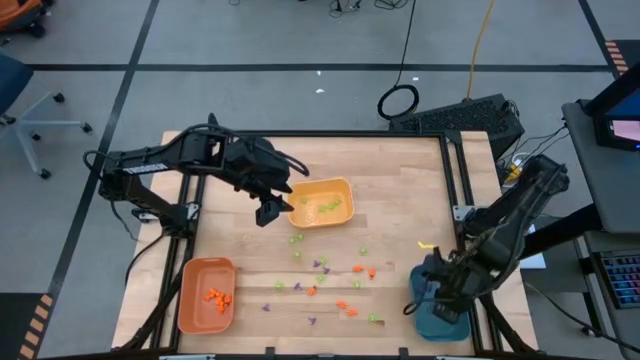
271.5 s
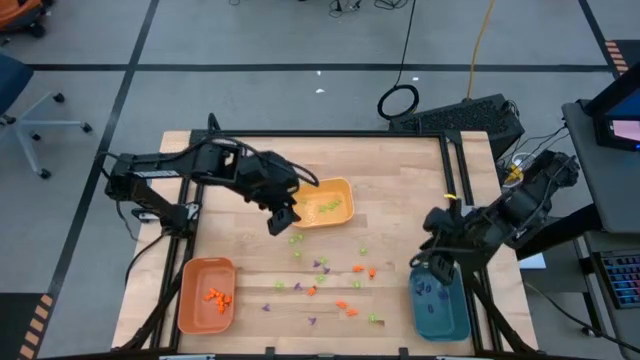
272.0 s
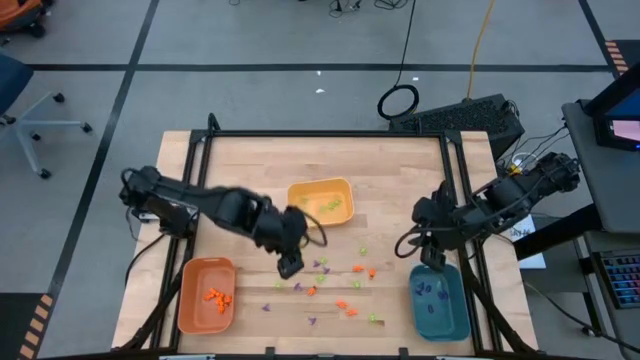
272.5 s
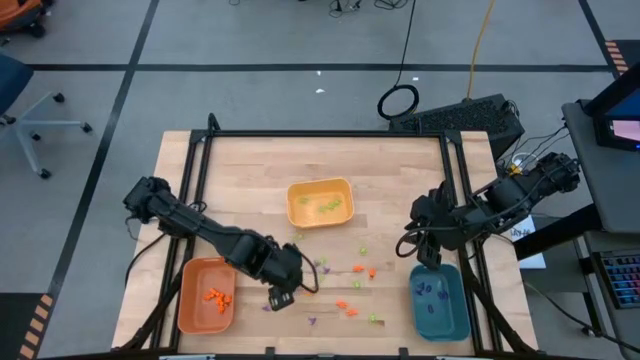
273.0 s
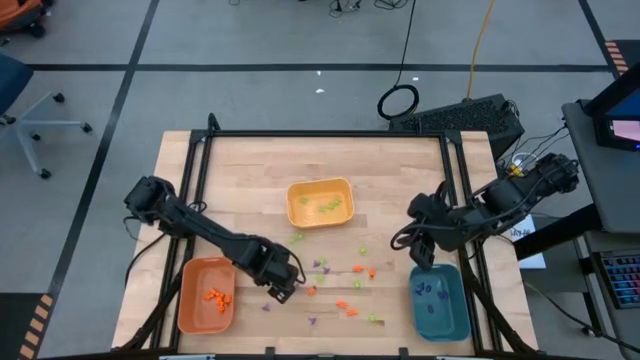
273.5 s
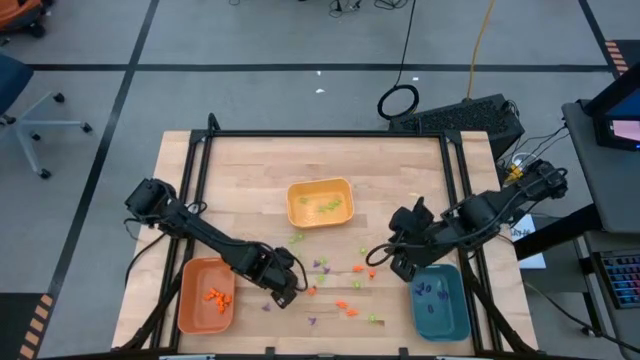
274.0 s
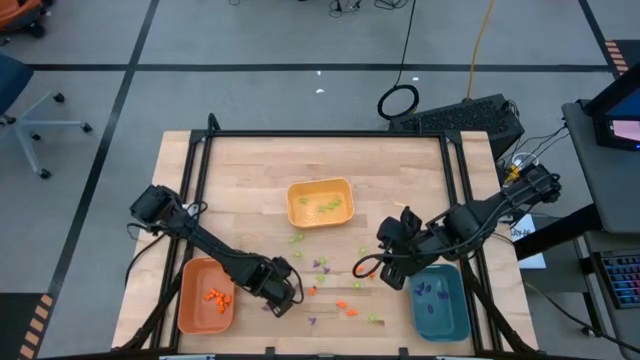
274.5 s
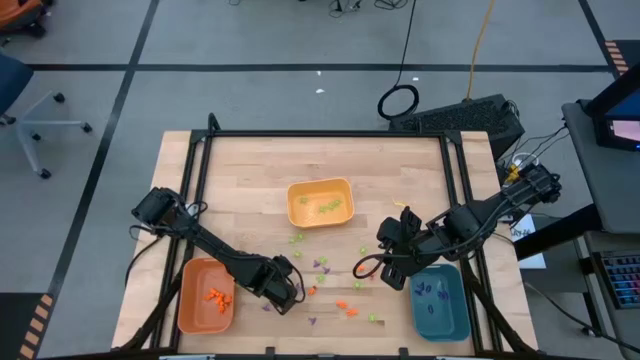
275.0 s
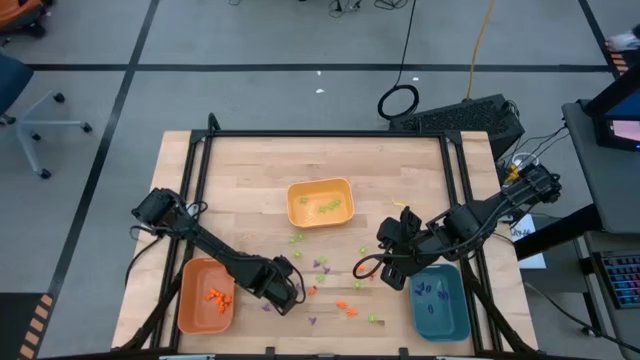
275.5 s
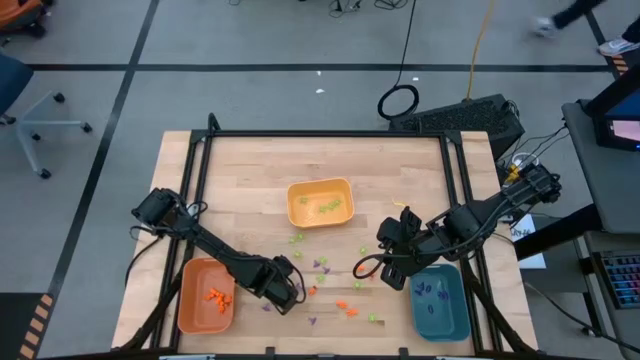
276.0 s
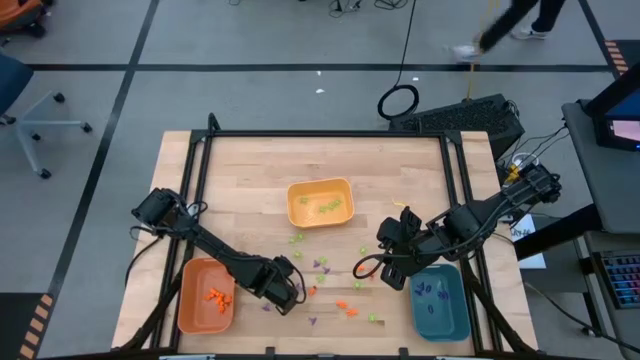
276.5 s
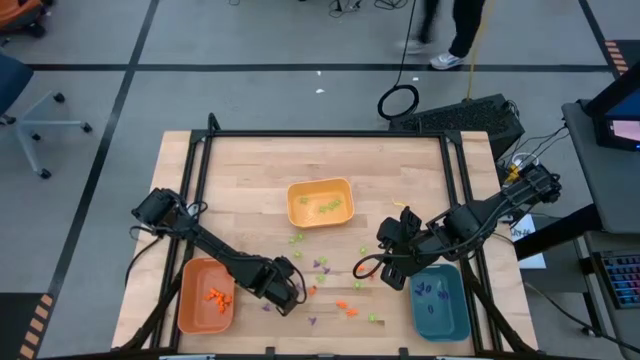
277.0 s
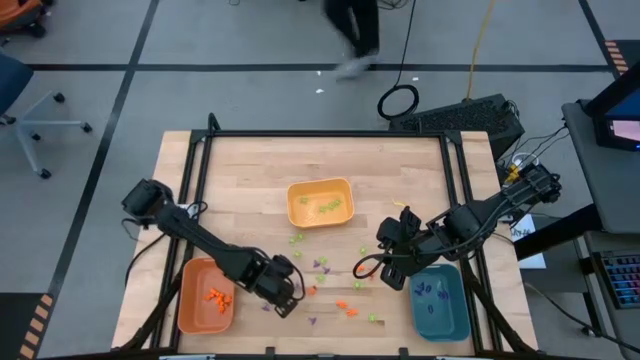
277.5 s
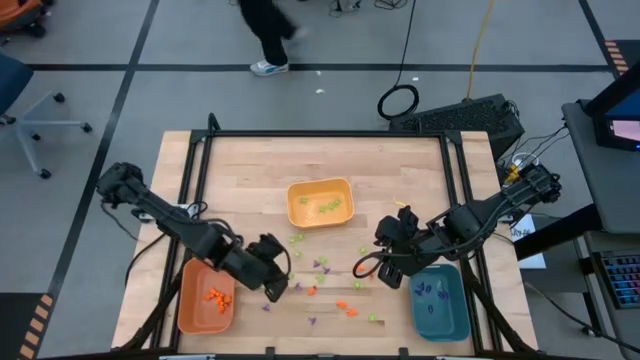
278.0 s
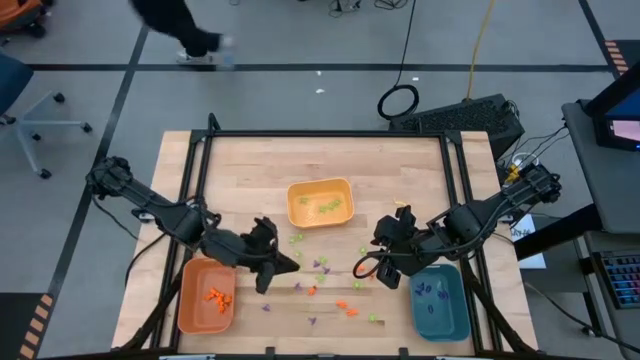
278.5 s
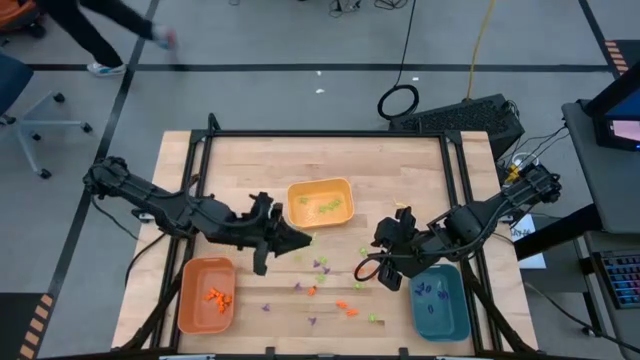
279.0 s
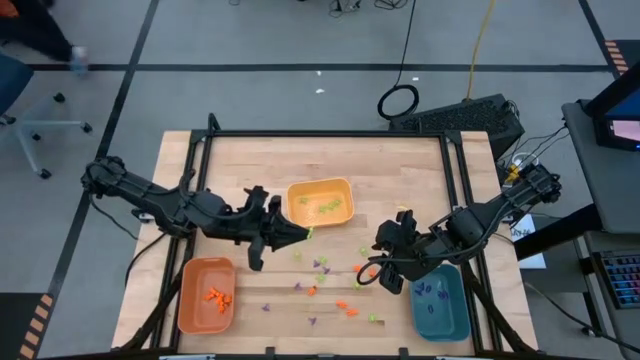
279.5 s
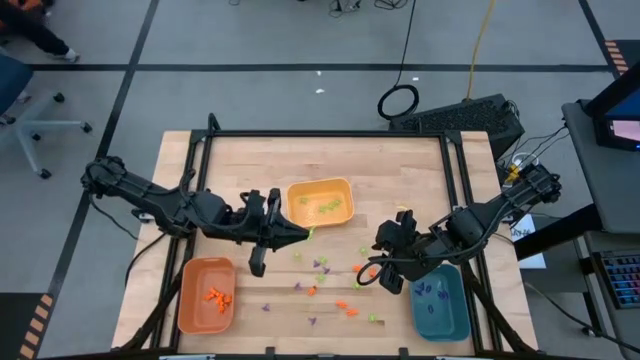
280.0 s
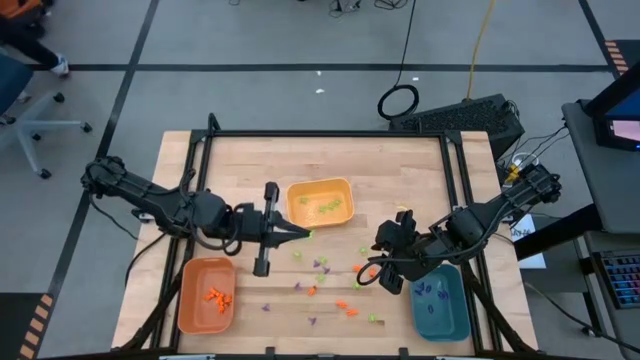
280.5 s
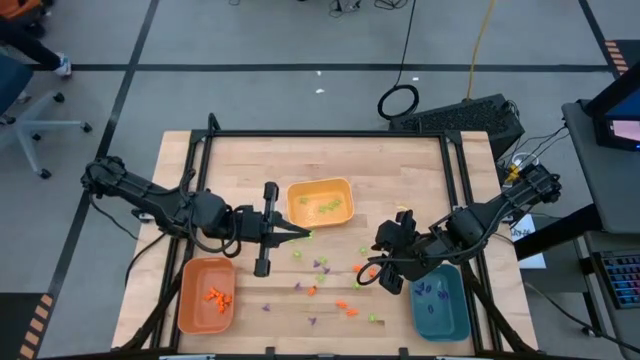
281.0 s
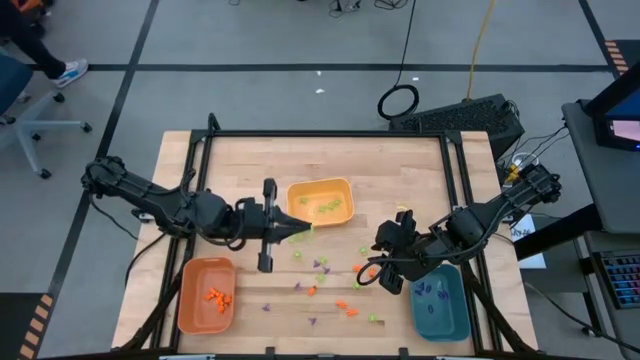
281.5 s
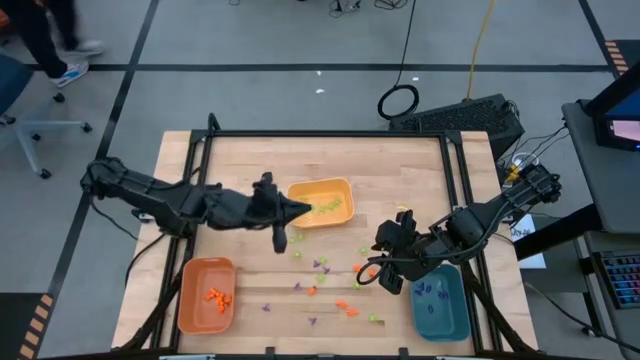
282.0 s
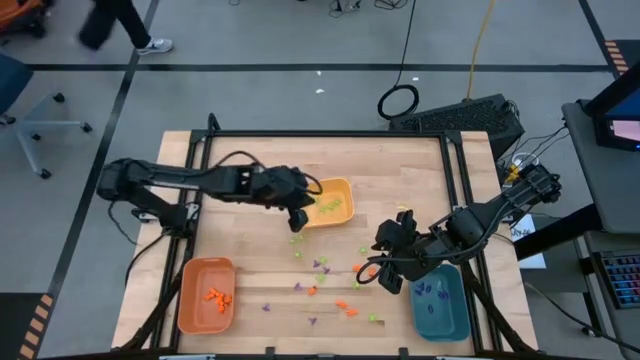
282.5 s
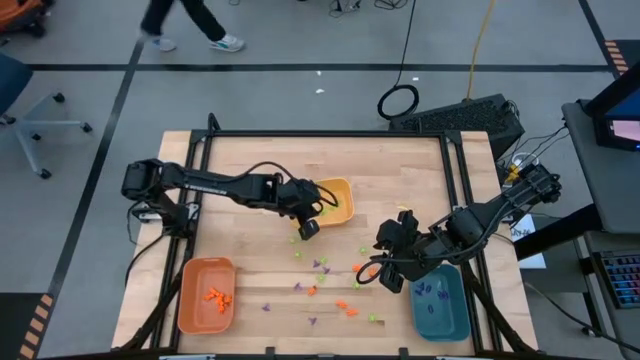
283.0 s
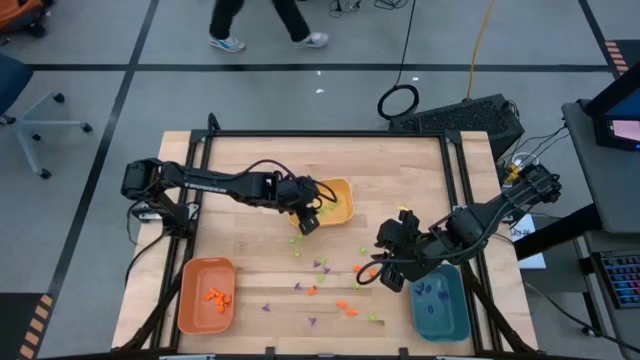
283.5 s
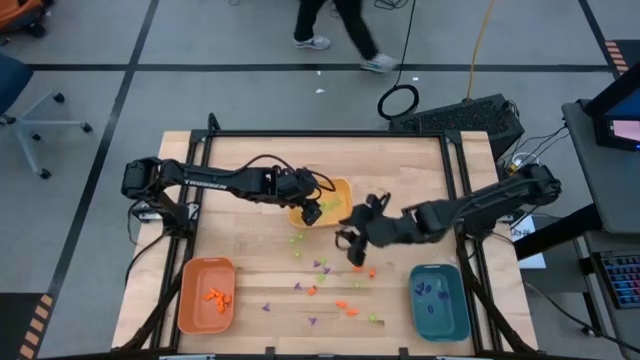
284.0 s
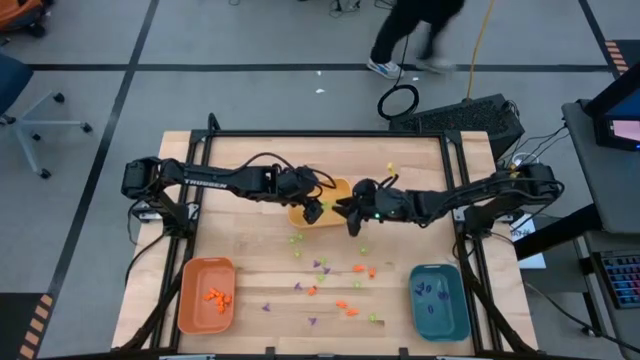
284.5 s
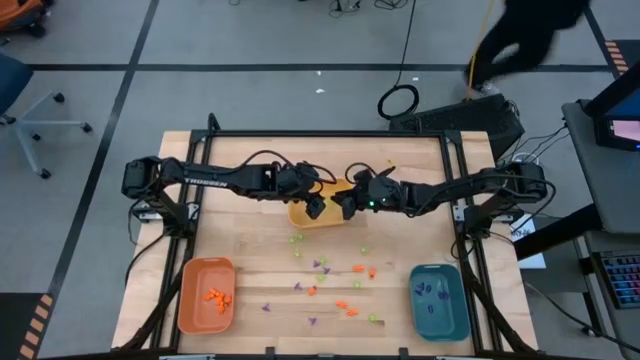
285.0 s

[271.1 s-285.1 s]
Task: Sort Halloween decoration
Put the green spider toy into the yellow bin

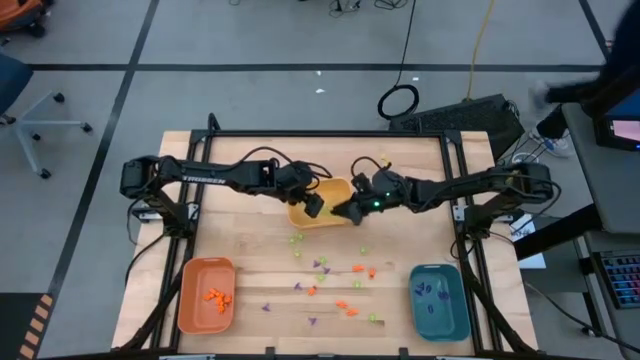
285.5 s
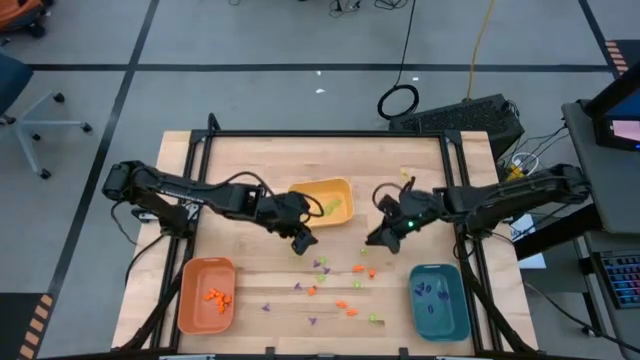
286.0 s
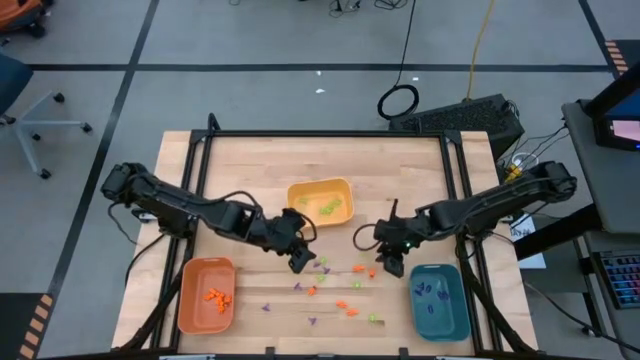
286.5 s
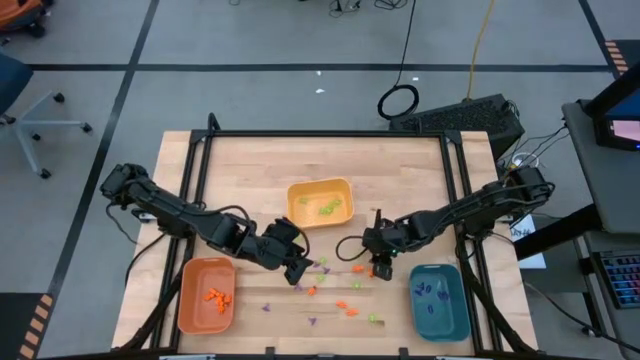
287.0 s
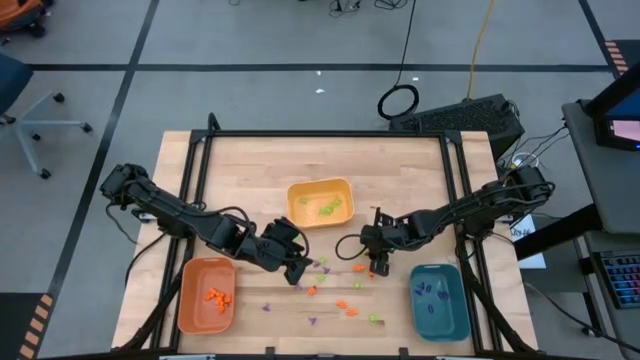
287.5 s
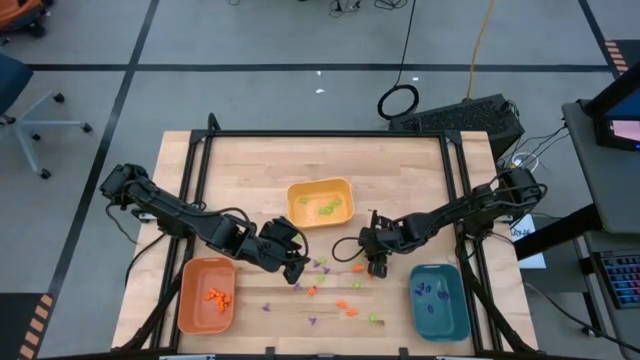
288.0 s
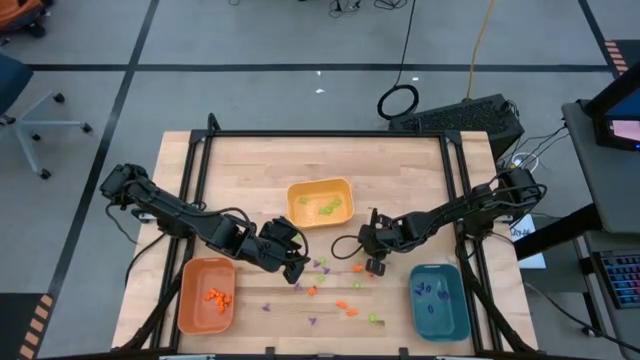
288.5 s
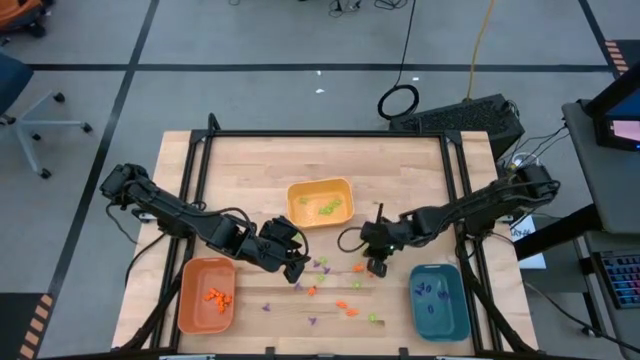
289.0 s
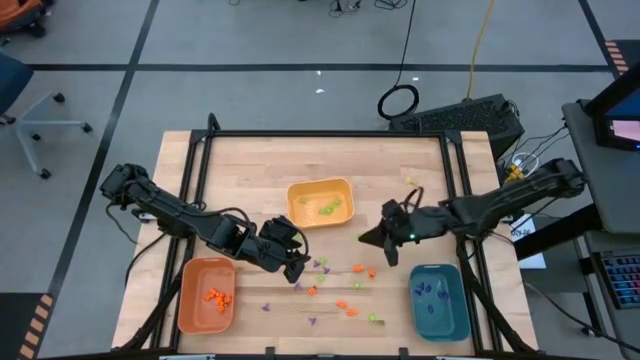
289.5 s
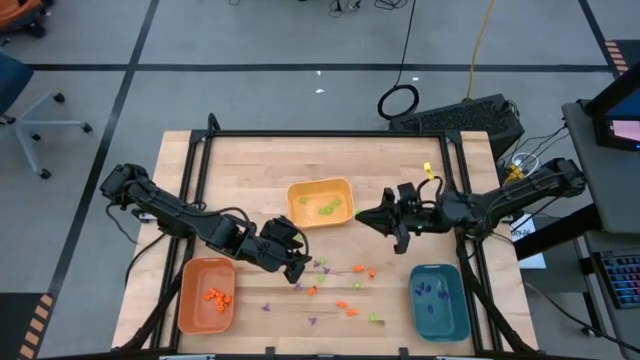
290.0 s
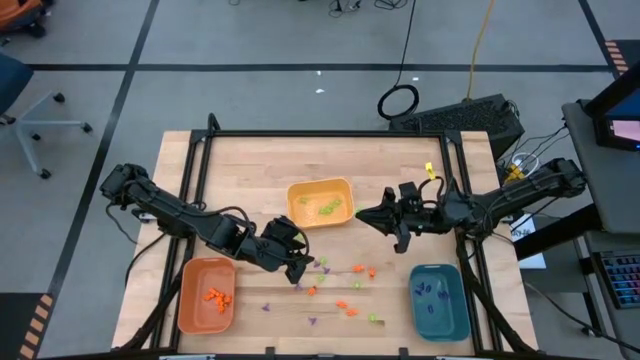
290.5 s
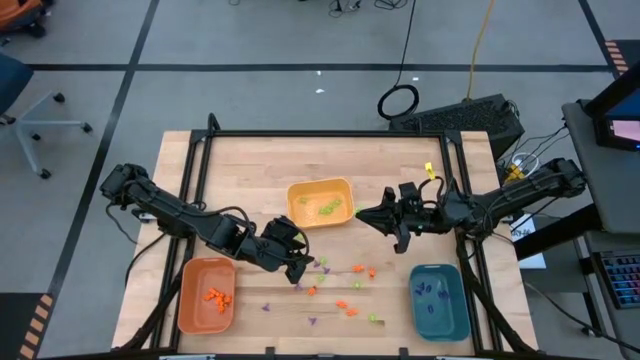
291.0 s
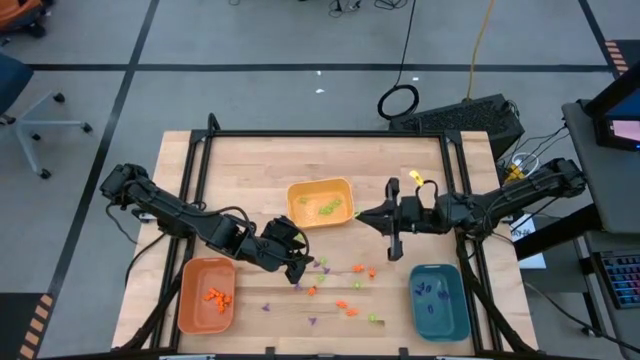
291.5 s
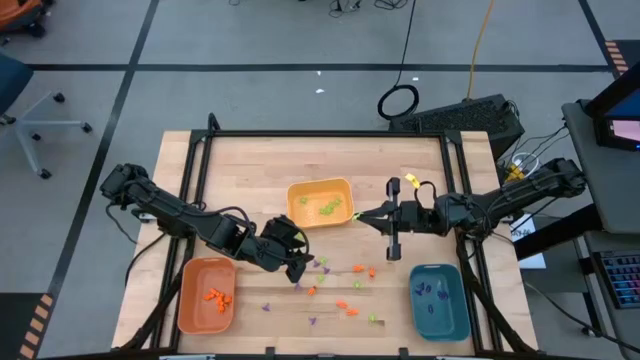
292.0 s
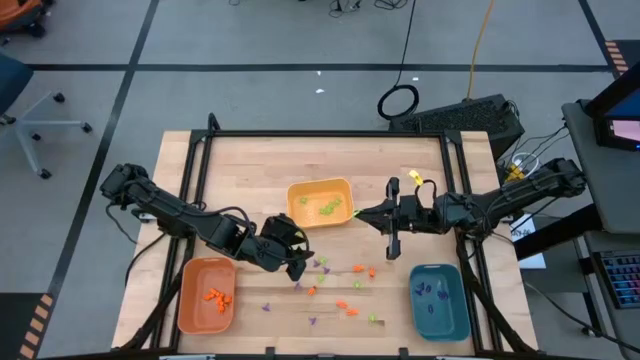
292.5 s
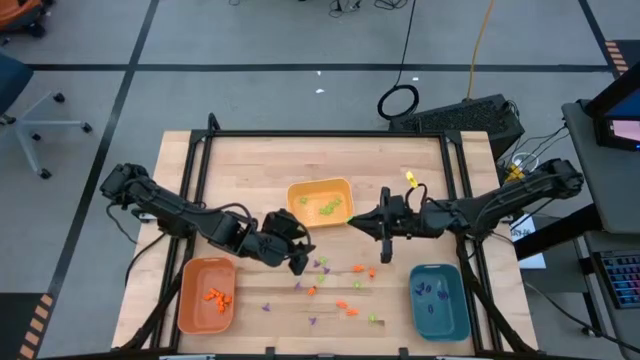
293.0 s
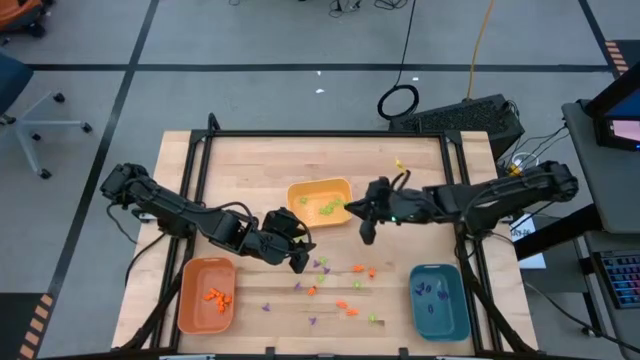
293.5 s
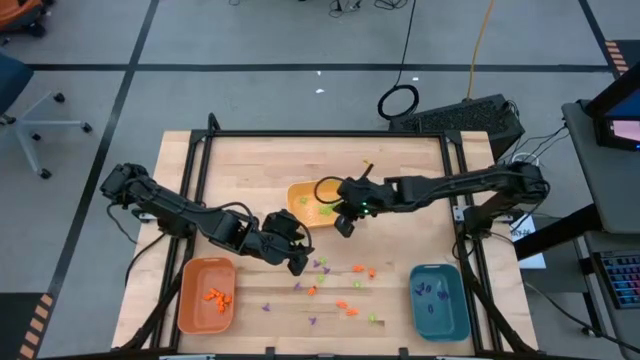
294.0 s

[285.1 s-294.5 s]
Put the green spider toy into the yellow bin
